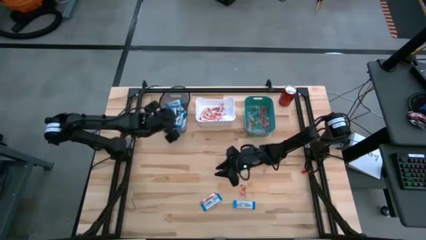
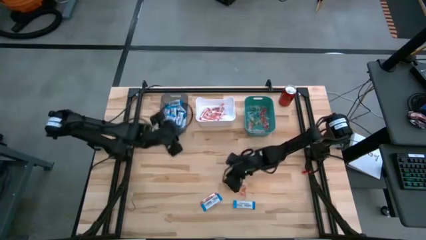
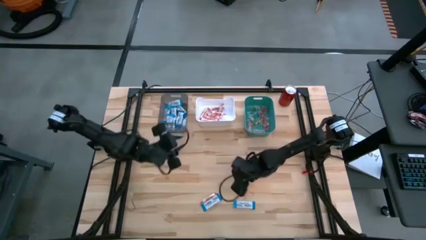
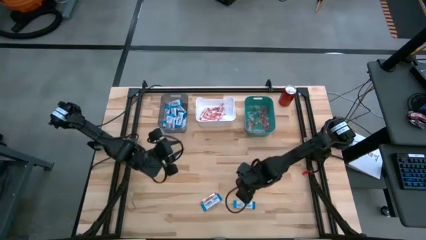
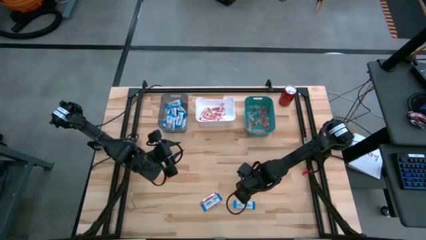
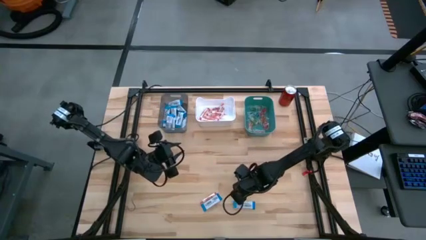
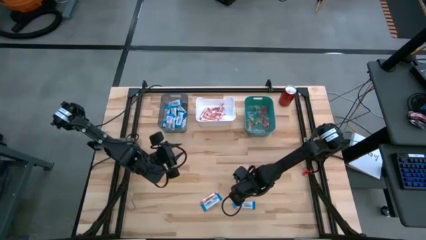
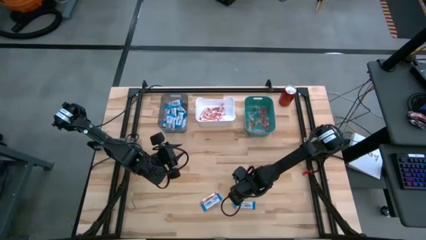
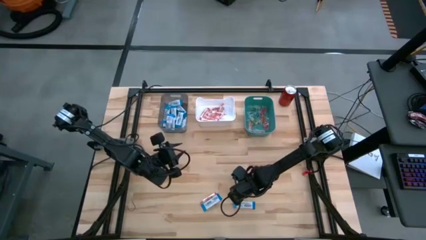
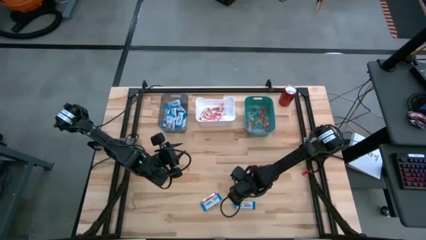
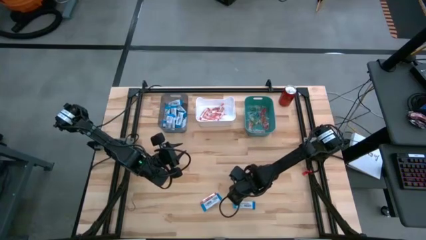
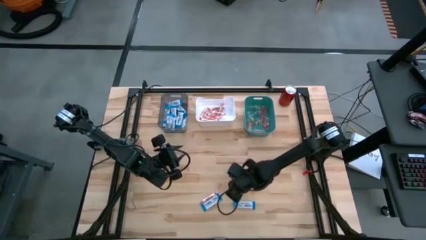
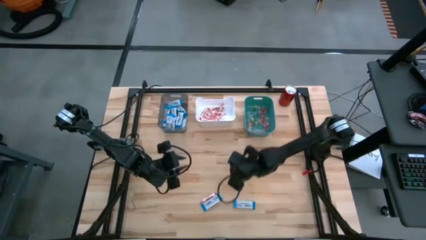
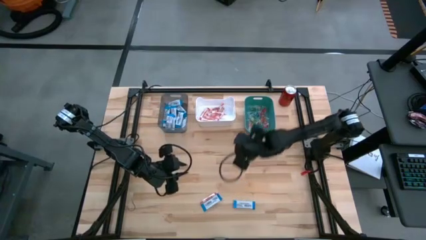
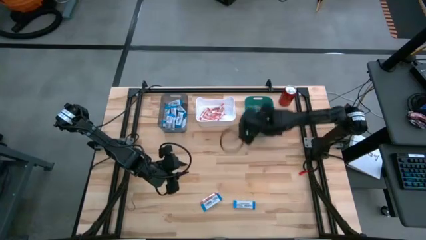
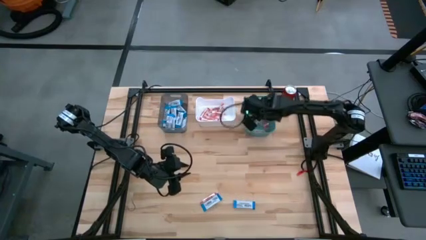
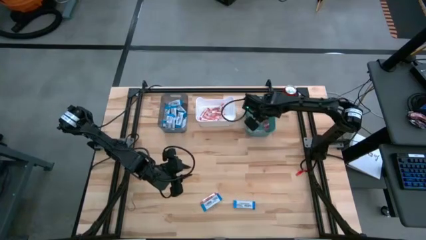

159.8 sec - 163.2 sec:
Task: Sort candy
Put the transparent candy into the green bin

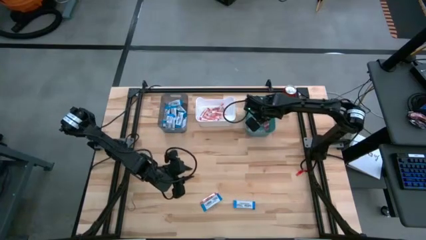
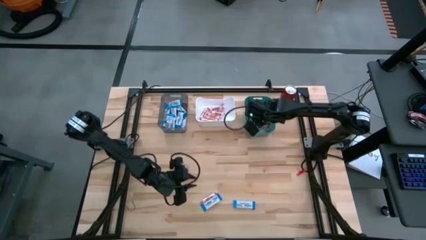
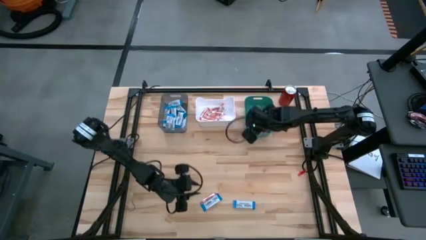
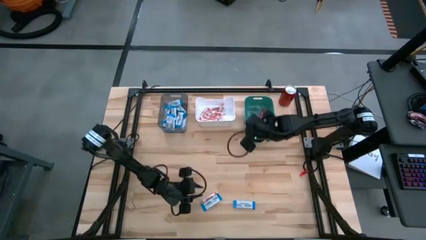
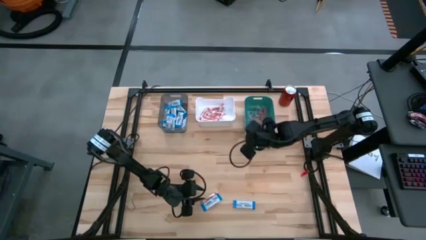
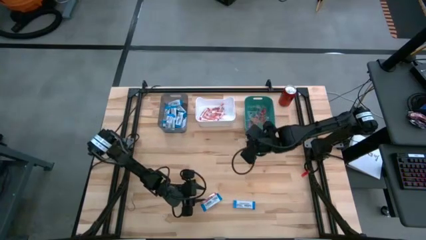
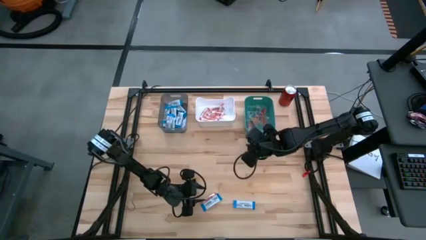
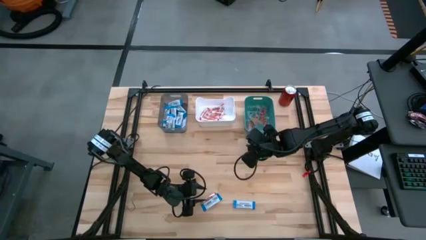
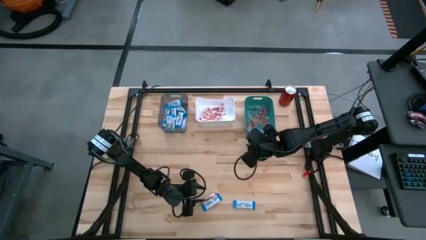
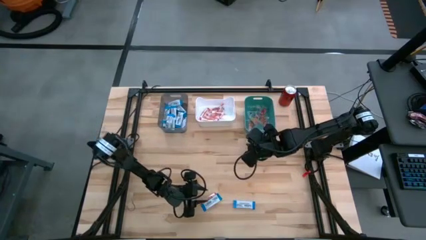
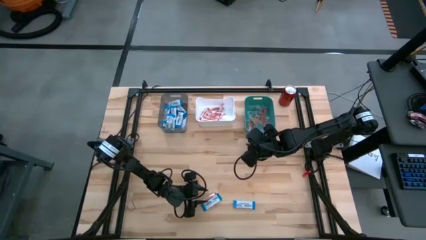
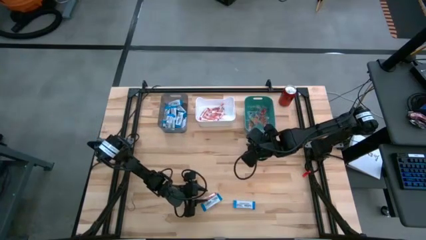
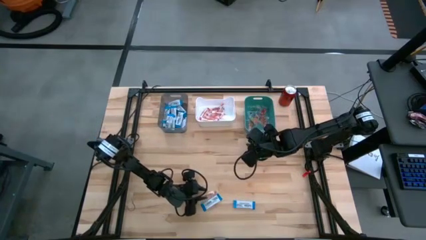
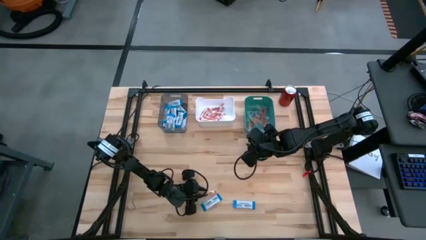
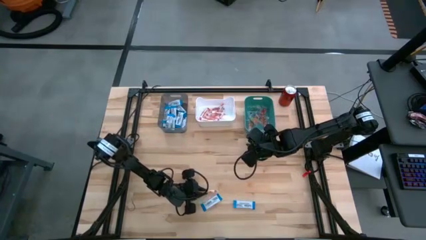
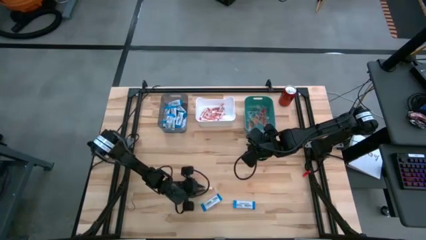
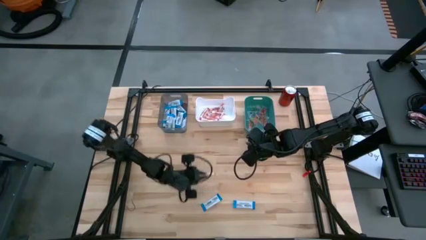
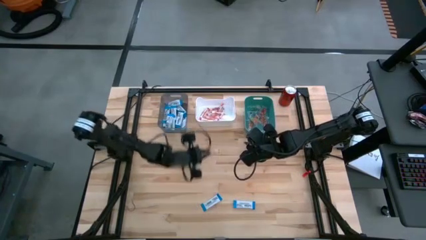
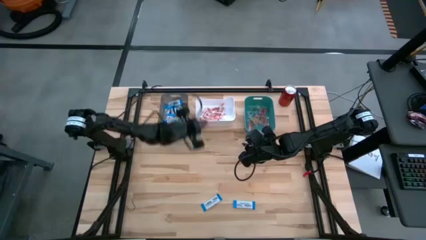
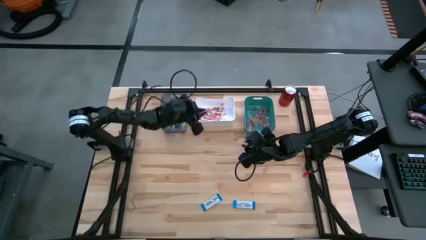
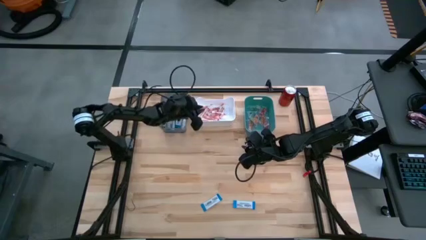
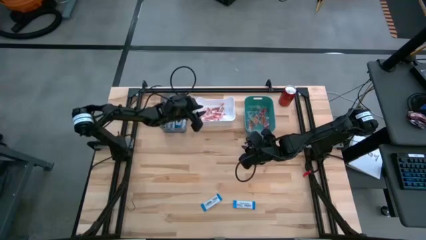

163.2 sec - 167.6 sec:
Put the orange candy into the white bin

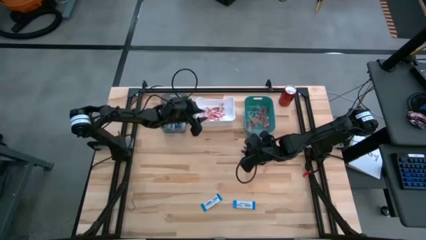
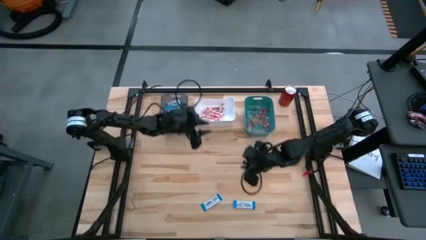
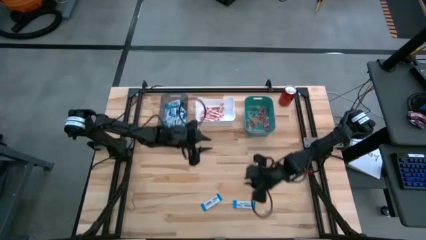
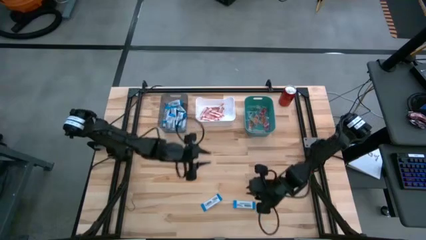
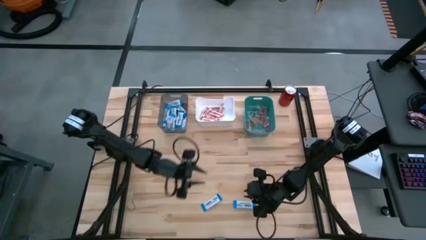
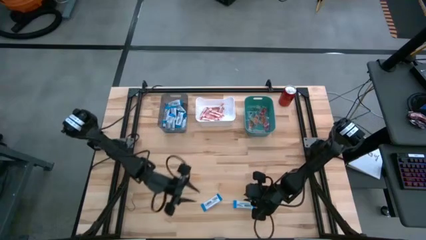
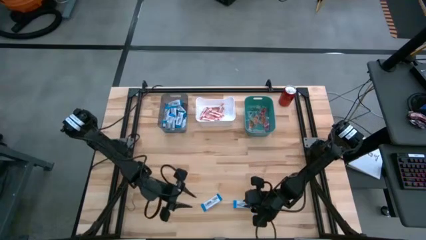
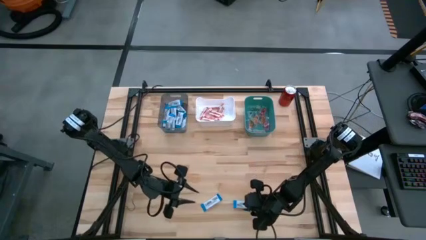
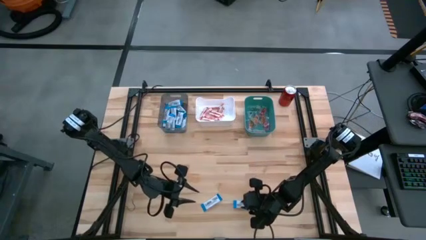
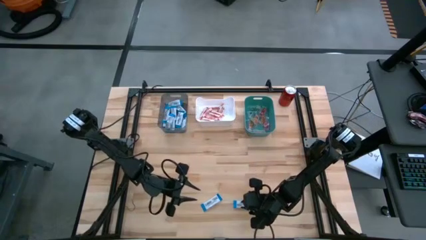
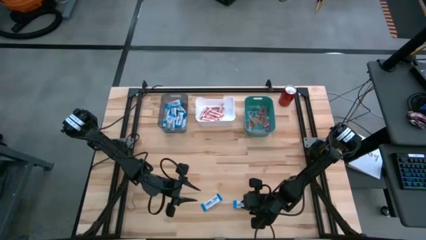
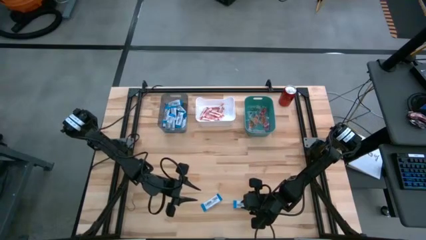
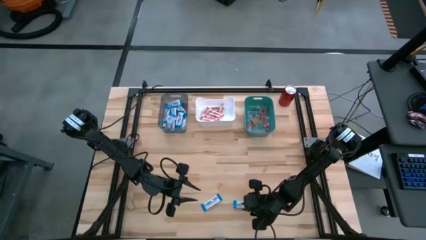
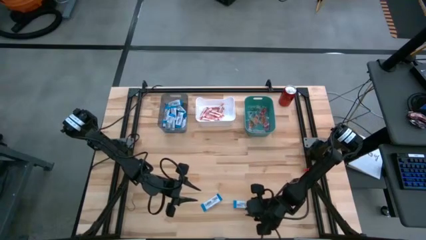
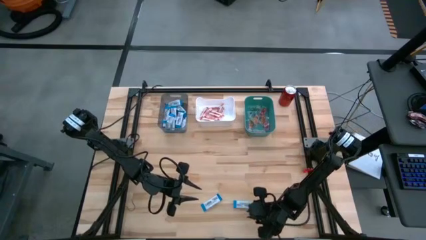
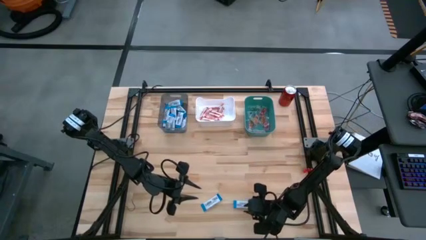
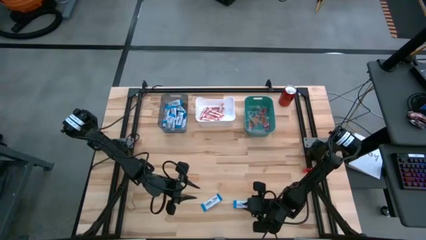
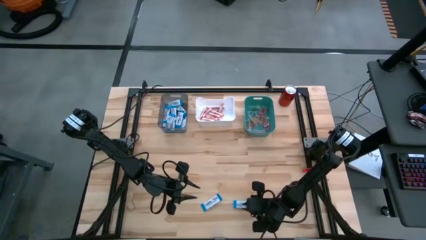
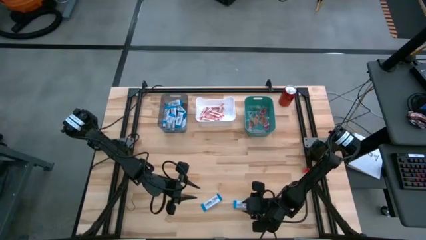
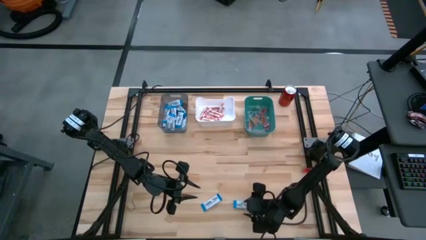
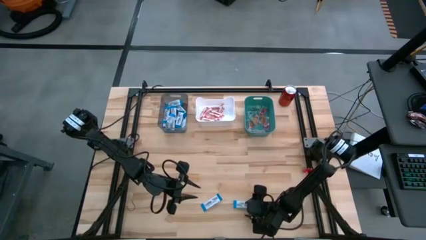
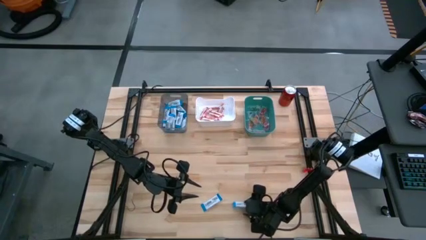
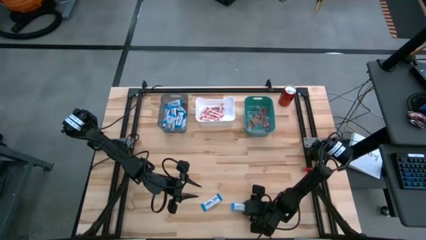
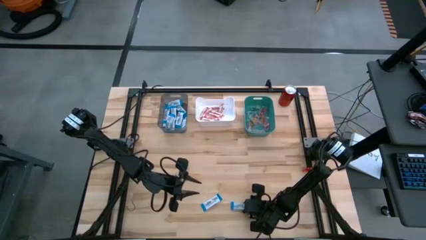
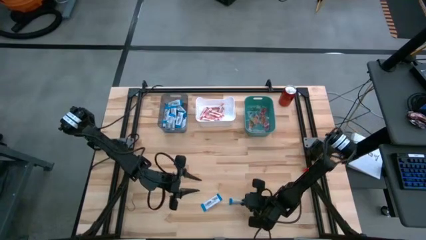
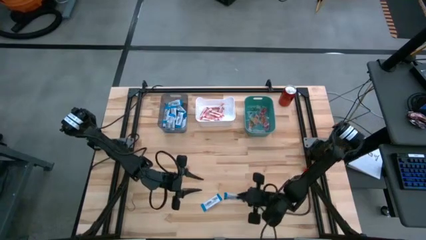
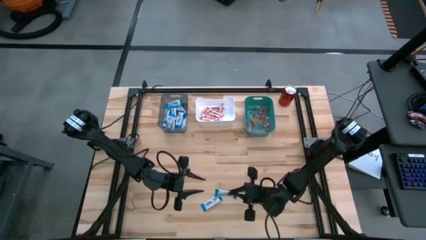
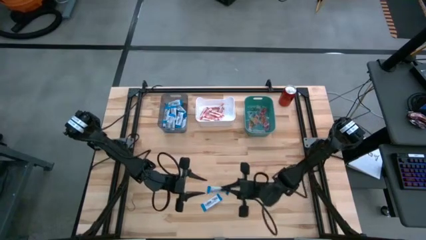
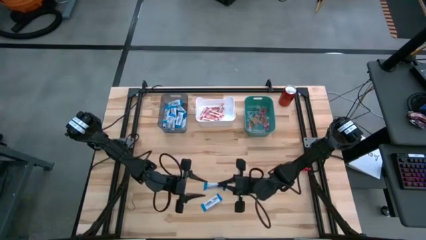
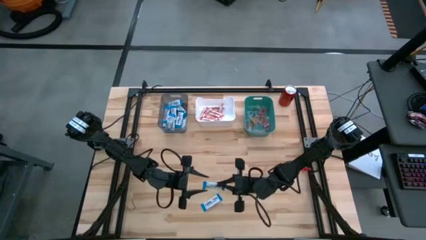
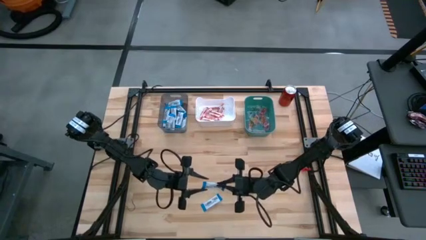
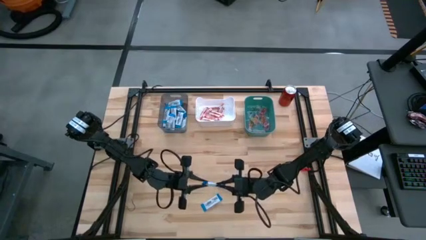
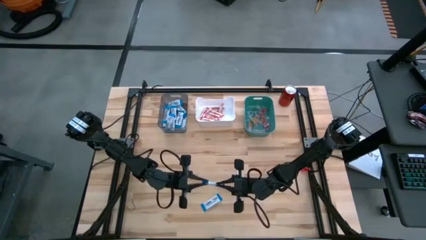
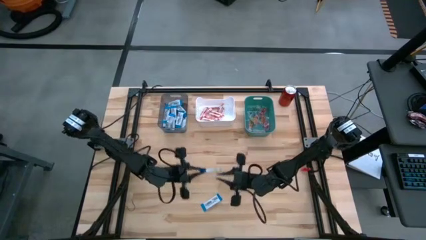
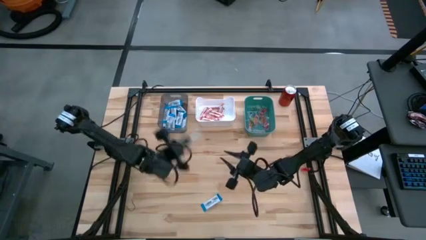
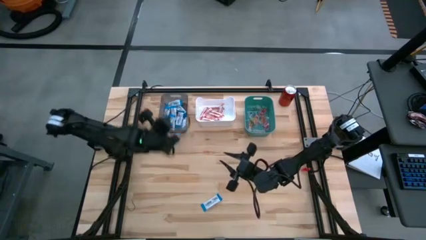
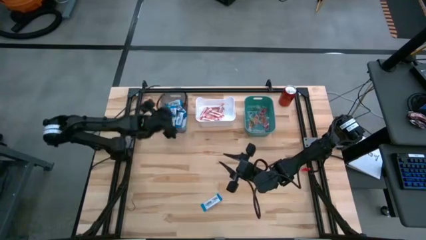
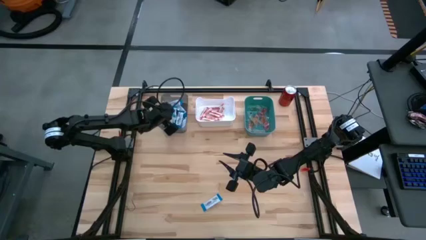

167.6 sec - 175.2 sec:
Put the white chocolate into the gray bin

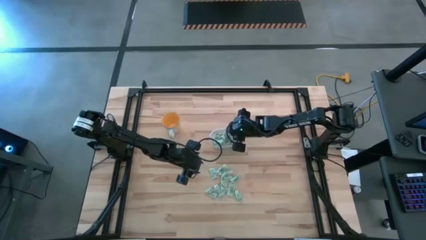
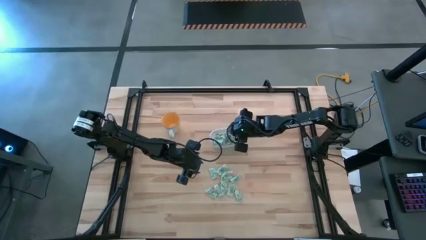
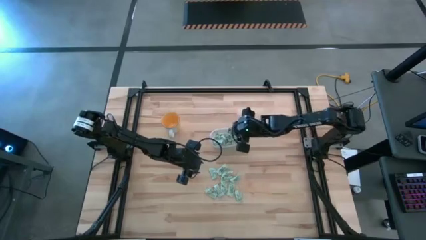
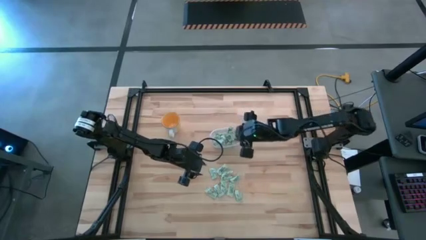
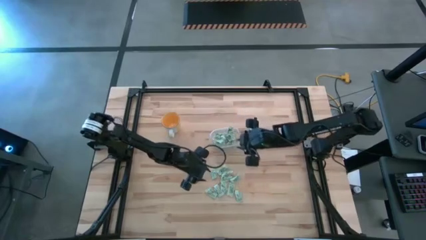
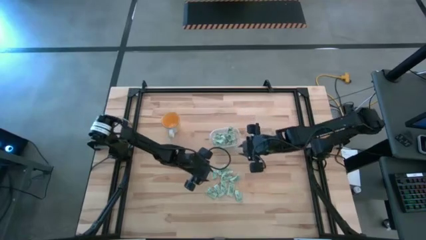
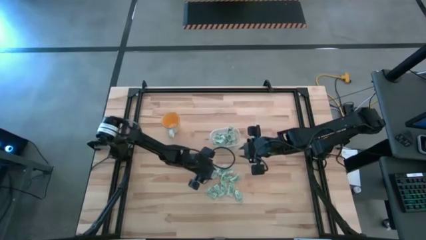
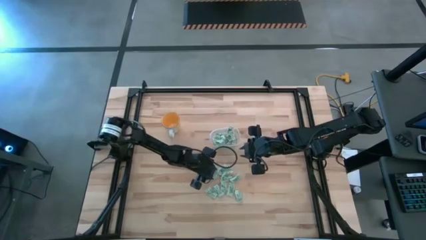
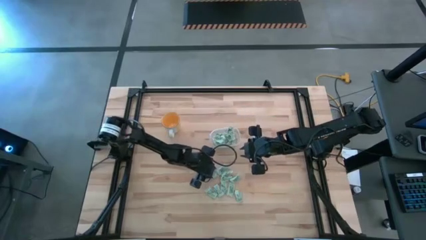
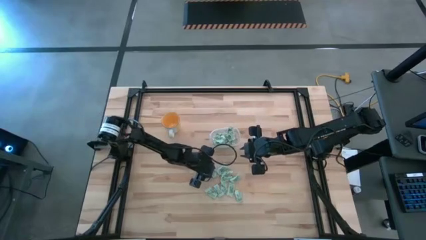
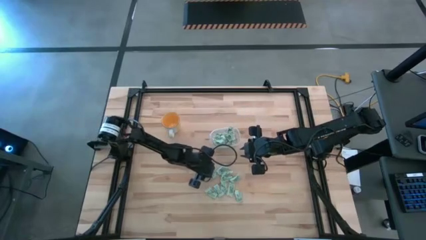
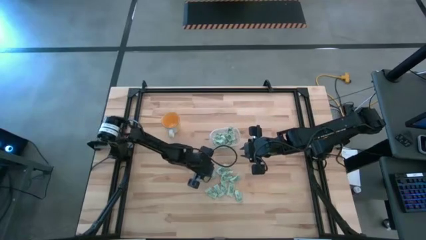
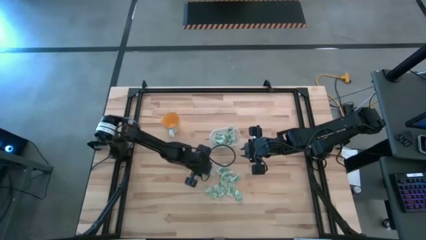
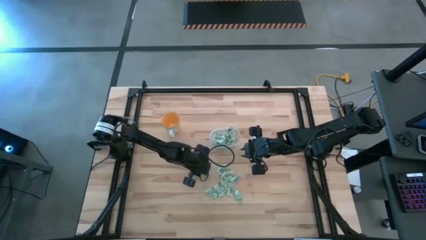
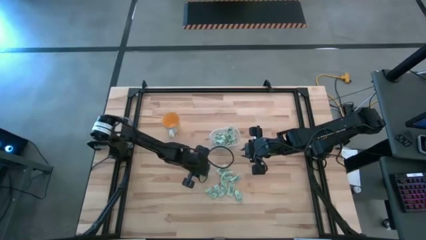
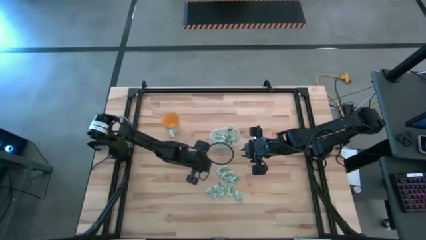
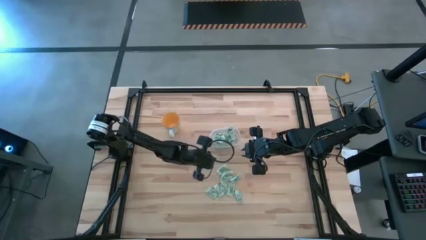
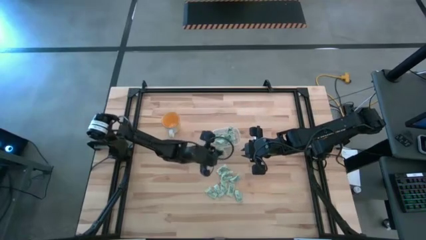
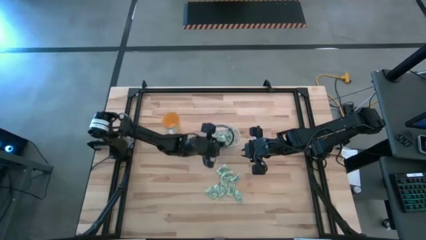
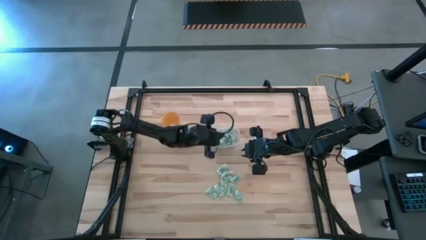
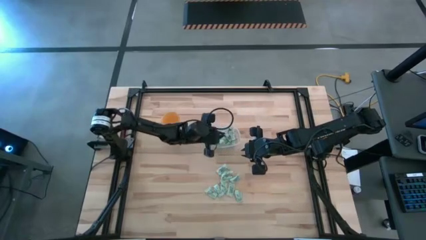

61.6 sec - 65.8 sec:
Task: Pick and place Stevia / Truvia into bins
Put the stevia packet into the transparent bin
